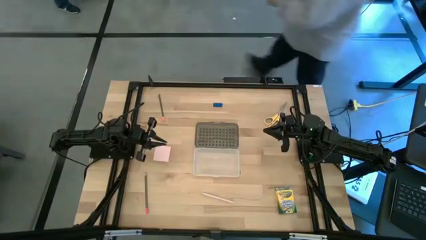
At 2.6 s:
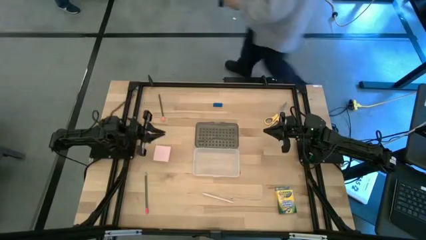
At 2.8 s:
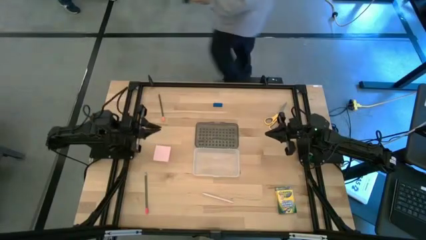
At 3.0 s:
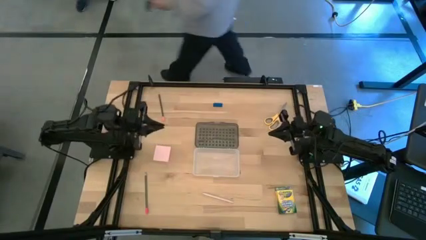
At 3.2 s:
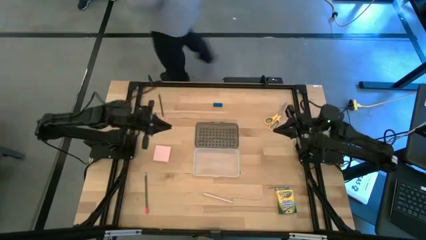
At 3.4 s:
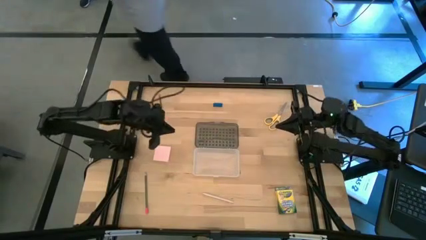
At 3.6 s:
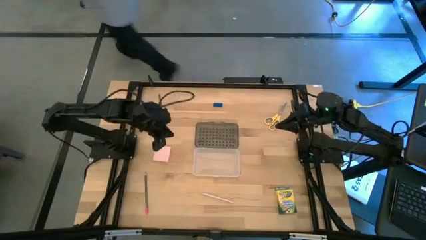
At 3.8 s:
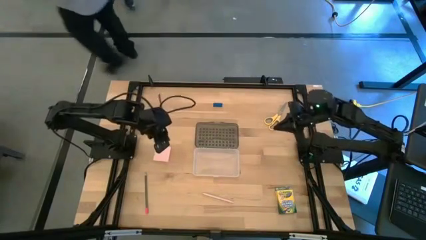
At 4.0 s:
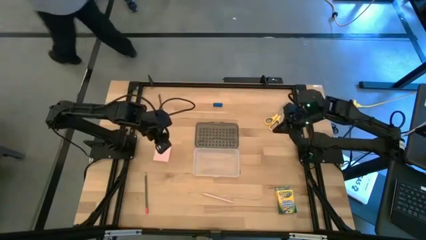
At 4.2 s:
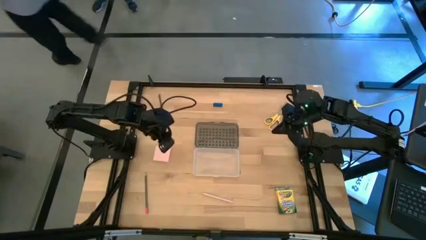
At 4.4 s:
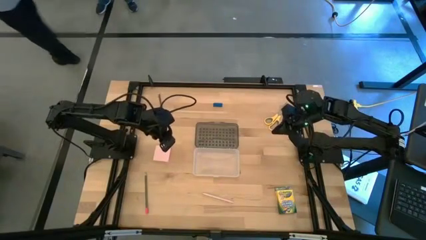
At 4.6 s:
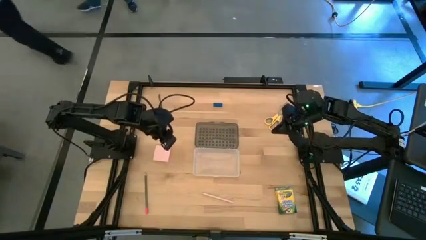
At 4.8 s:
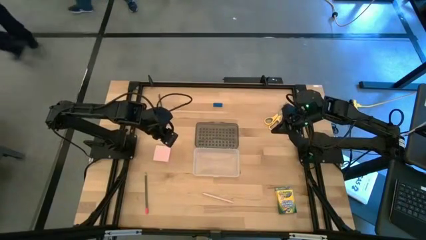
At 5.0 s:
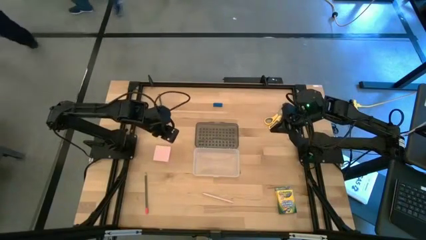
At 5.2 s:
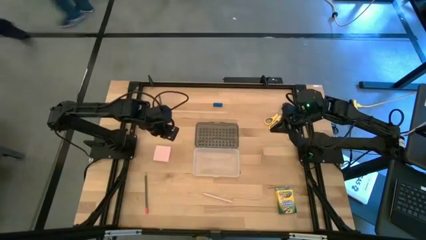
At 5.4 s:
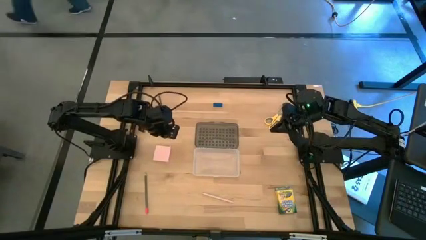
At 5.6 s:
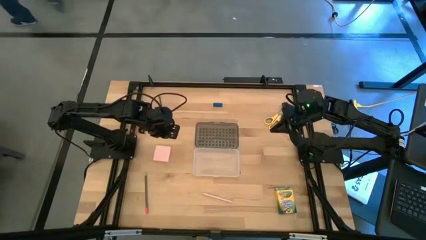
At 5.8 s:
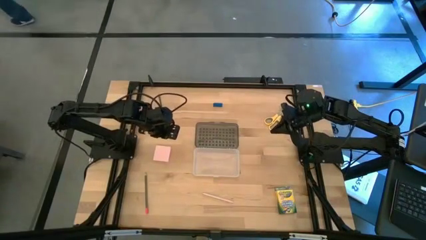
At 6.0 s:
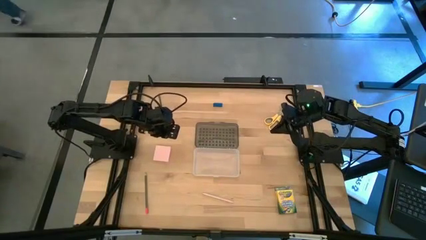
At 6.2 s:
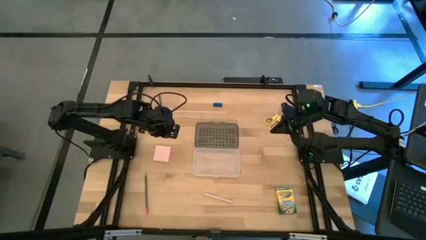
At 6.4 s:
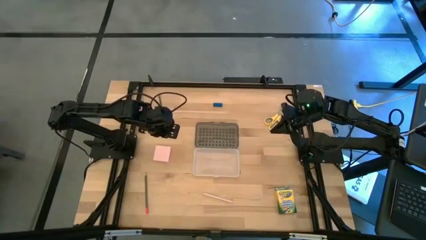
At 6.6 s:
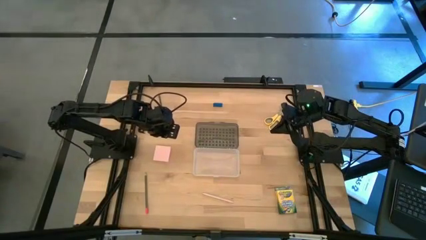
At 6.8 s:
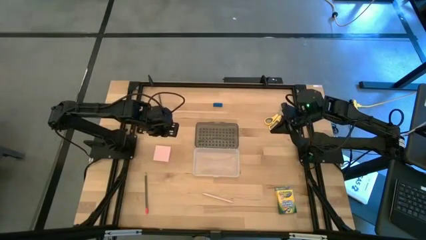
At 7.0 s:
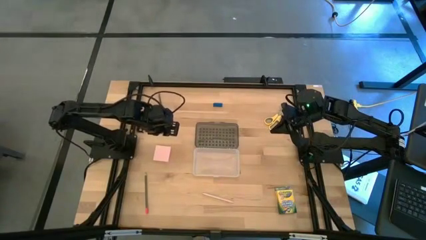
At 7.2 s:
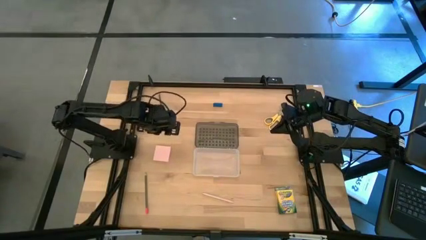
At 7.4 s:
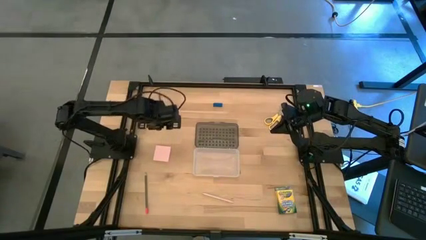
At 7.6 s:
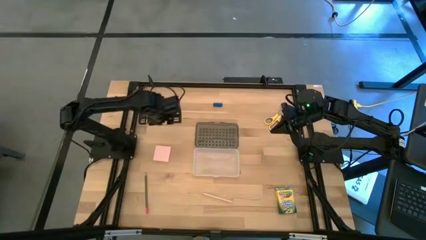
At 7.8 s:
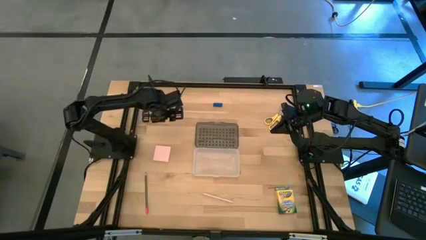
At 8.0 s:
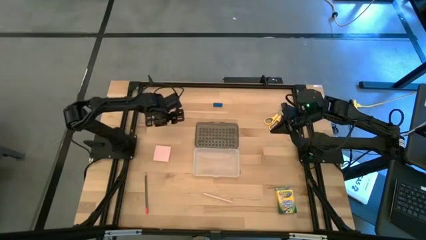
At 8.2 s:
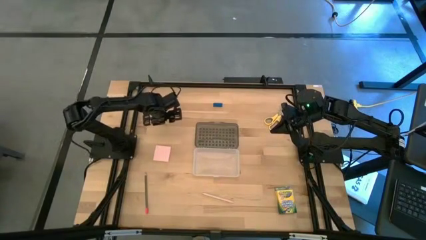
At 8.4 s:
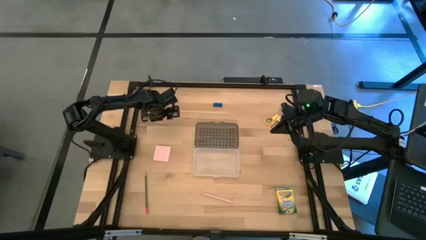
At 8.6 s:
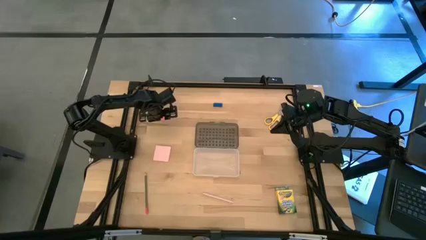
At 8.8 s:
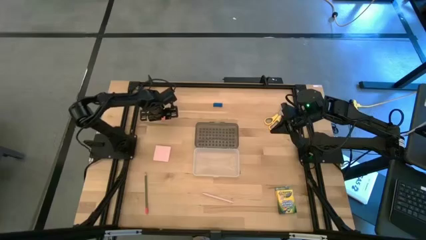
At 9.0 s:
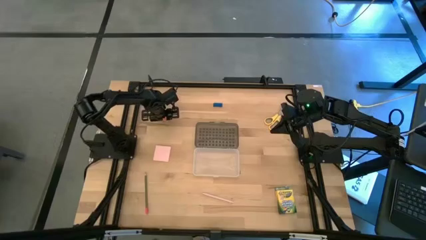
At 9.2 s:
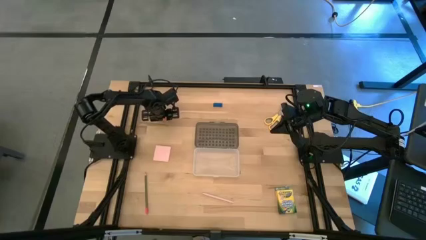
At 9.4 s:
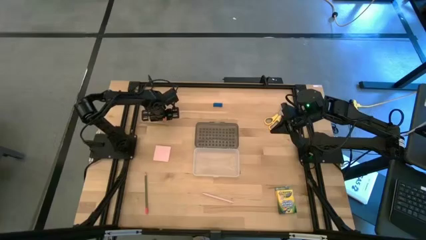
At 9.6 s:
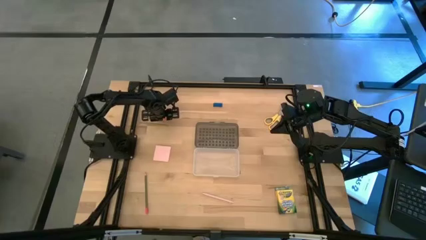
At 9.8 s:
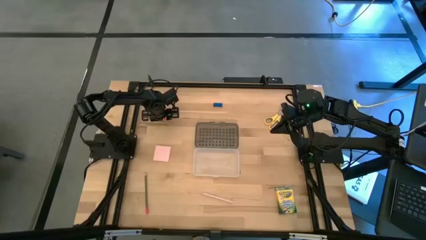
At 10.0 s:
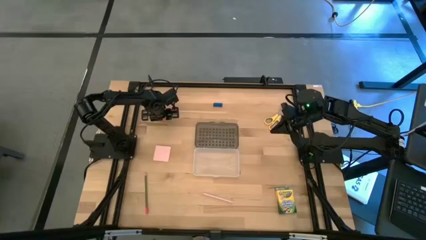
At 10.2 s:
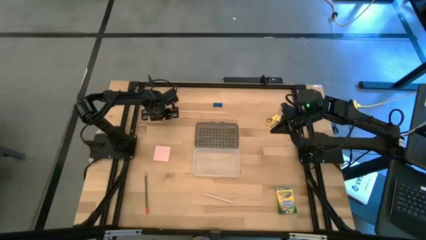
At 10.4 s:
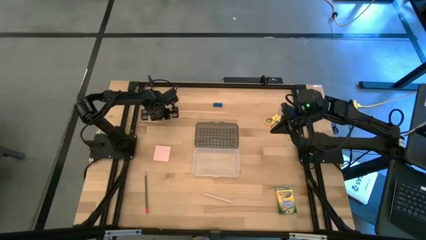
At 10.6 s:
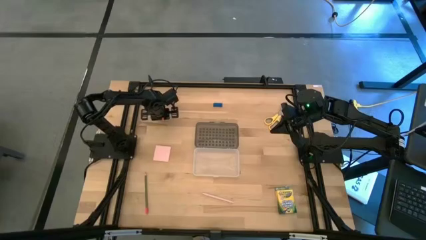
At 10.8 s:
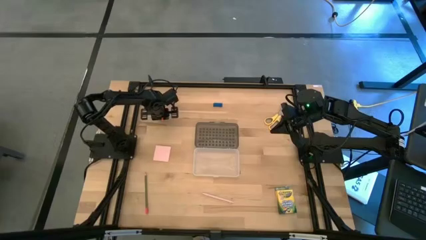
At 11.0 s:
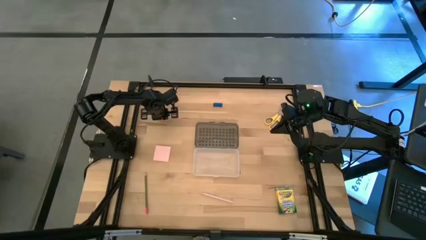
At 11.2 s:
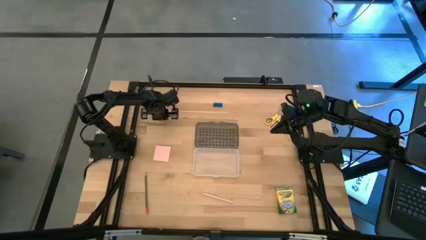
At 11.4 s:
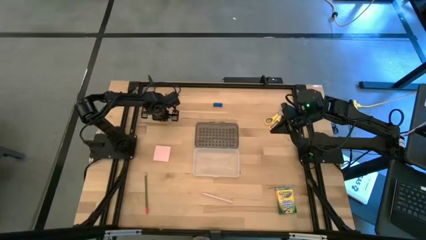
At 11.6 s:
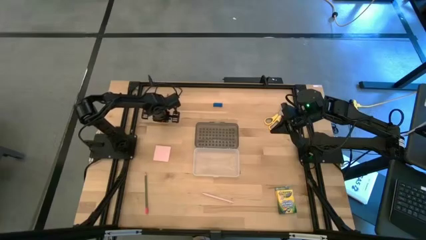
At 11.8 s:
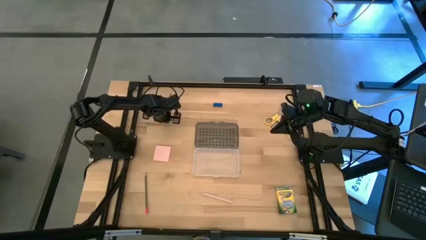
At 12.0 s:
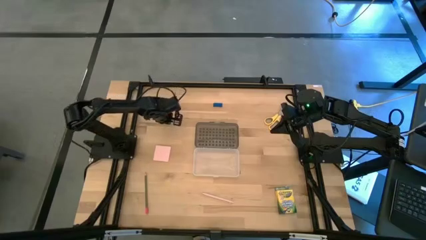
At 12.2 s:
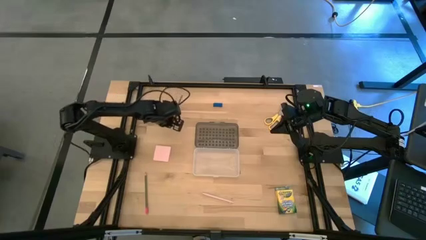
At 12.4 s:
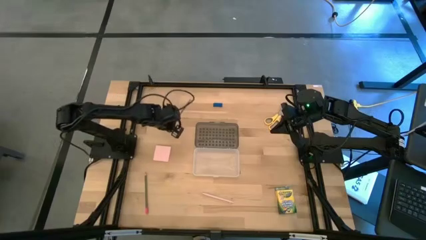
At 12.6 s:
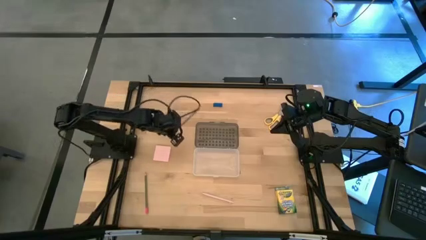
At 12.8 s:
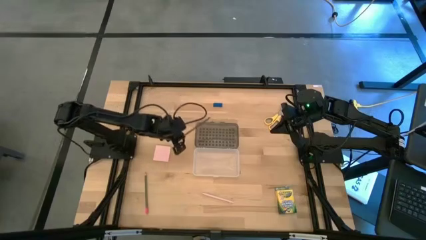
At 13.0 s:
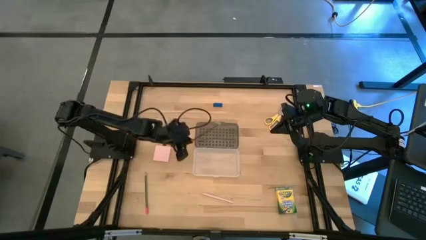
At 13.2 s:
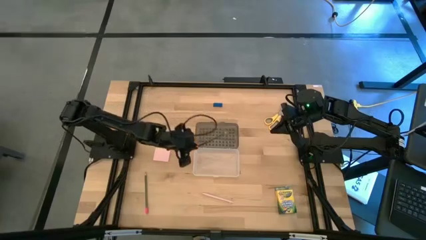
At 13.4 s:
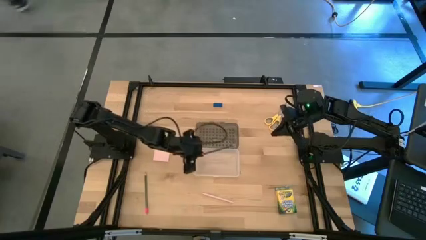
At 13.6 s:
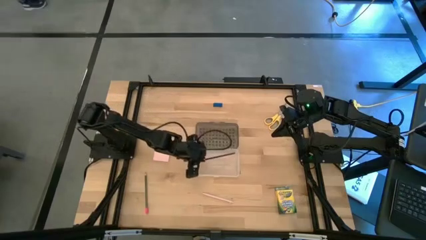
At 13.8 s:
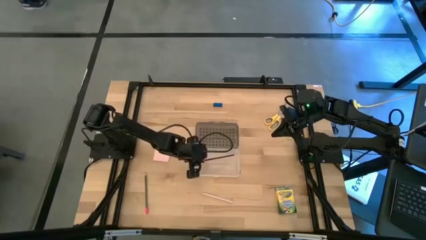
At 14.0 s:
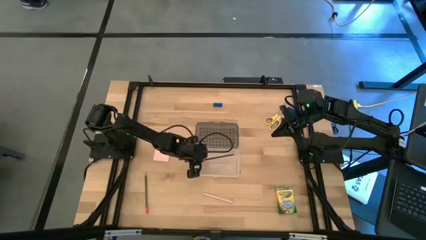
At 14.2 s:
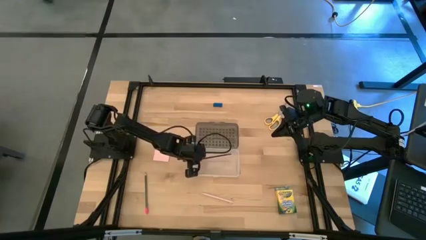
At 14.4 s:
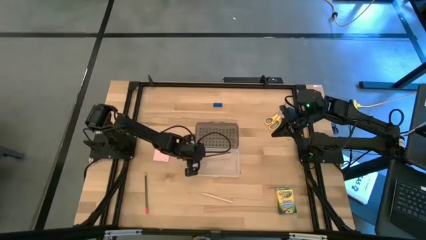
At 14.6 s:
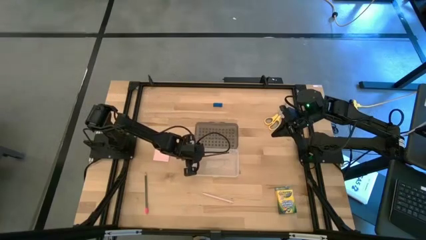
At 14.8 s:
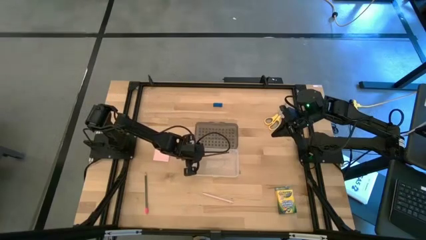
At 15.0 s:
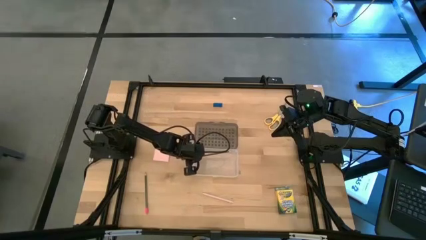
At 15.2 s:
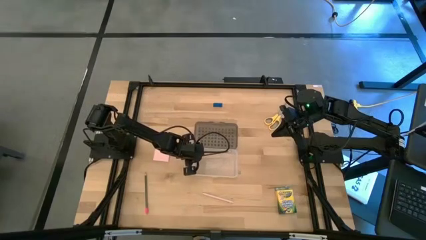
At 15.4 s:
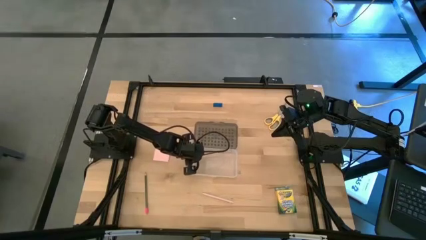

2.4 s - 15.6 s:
Task: Pack school essentials
Put the top black pencil into the black supply box
